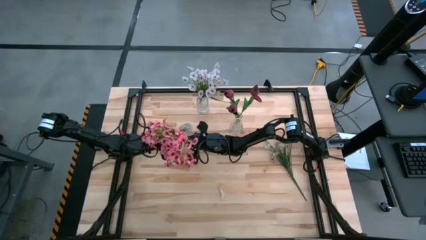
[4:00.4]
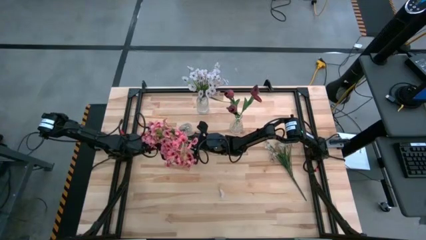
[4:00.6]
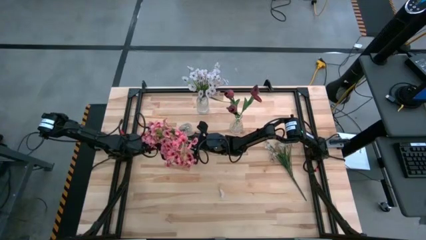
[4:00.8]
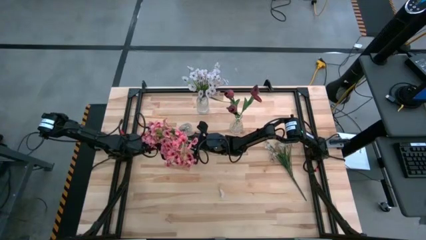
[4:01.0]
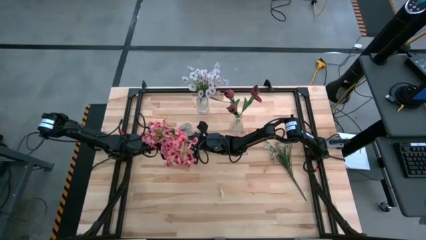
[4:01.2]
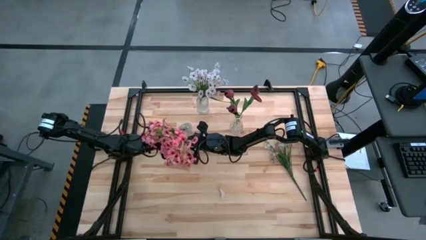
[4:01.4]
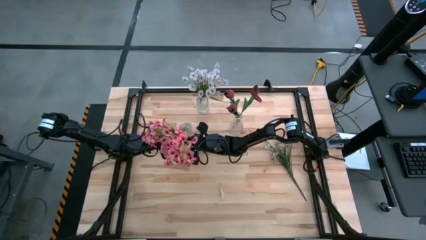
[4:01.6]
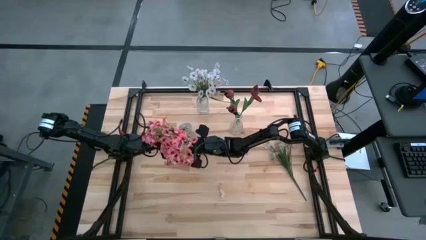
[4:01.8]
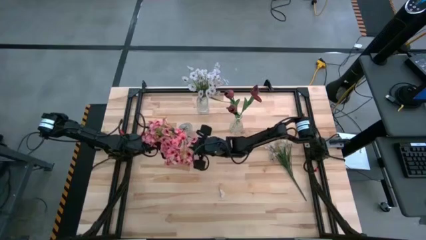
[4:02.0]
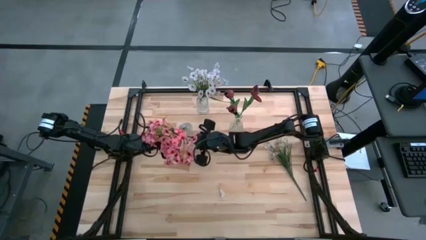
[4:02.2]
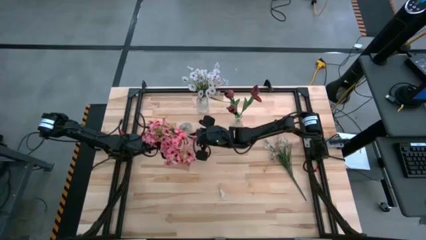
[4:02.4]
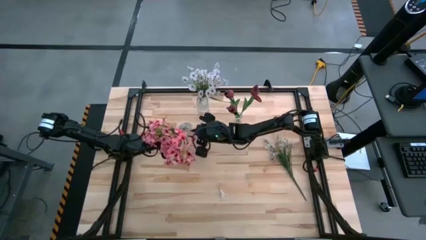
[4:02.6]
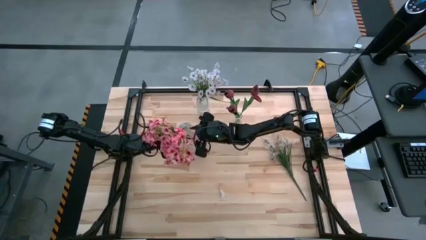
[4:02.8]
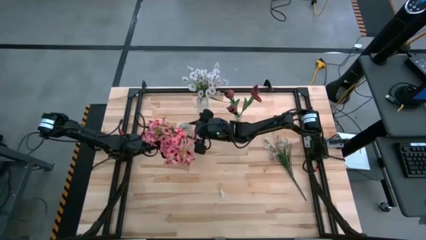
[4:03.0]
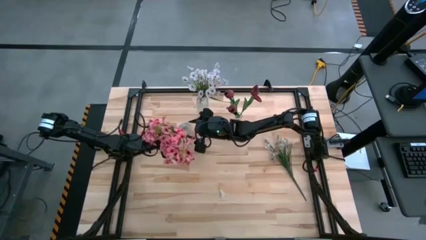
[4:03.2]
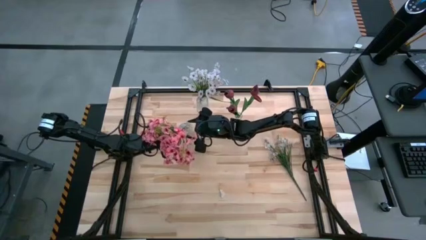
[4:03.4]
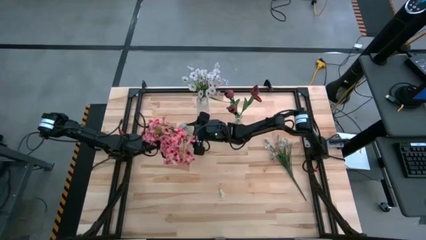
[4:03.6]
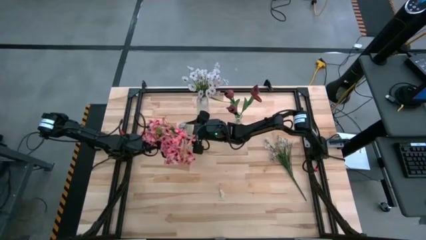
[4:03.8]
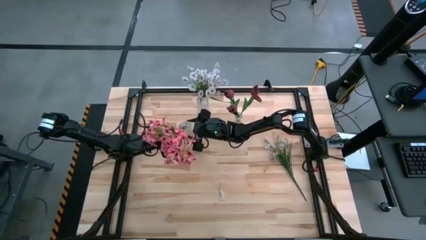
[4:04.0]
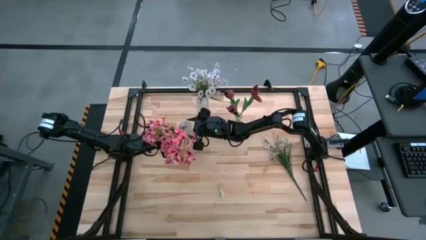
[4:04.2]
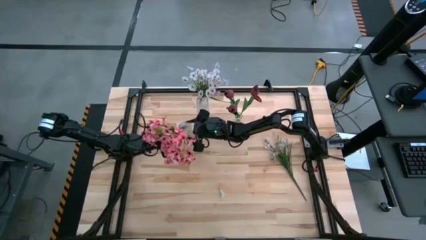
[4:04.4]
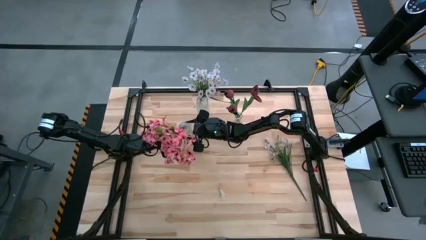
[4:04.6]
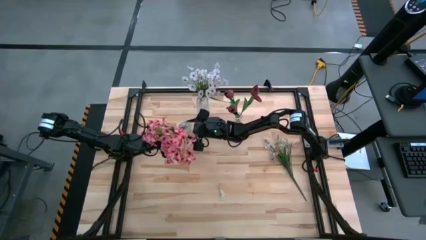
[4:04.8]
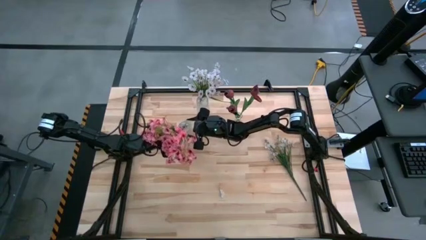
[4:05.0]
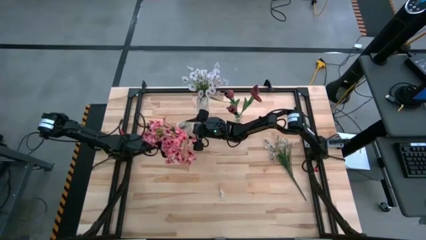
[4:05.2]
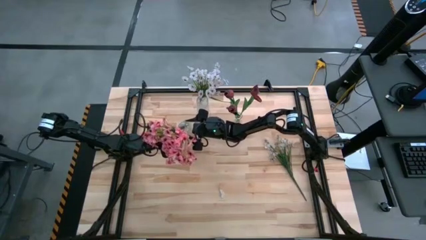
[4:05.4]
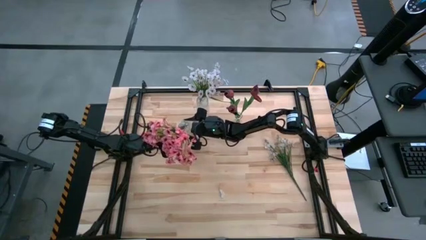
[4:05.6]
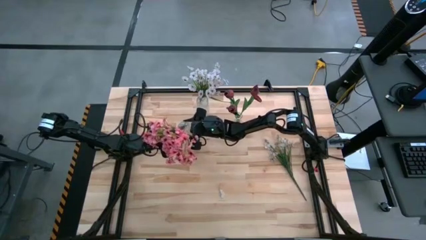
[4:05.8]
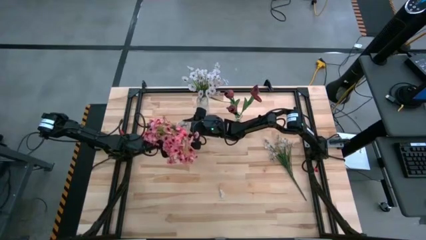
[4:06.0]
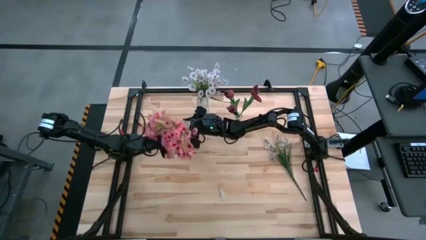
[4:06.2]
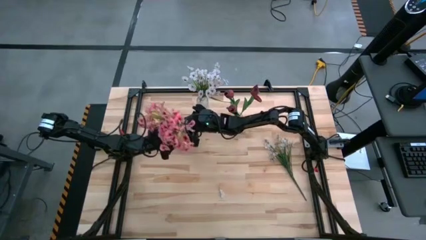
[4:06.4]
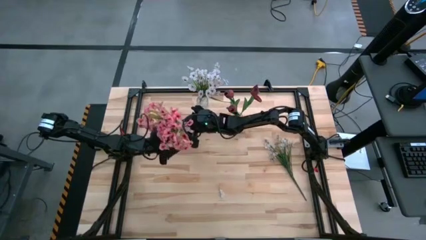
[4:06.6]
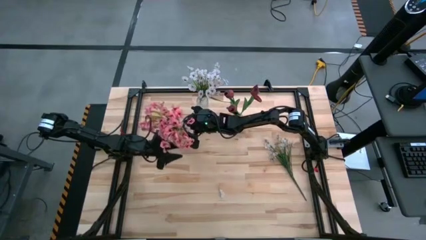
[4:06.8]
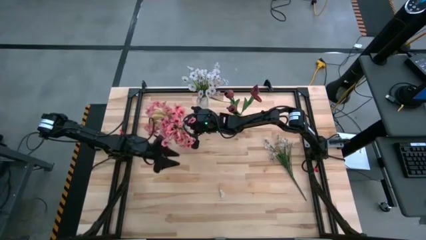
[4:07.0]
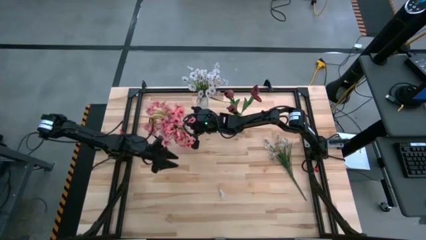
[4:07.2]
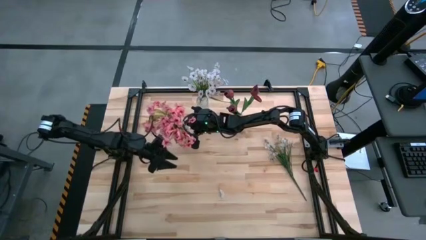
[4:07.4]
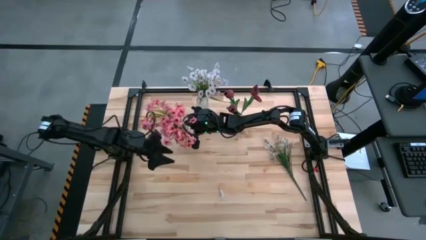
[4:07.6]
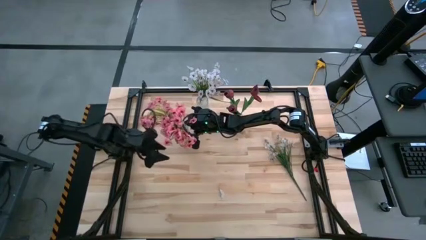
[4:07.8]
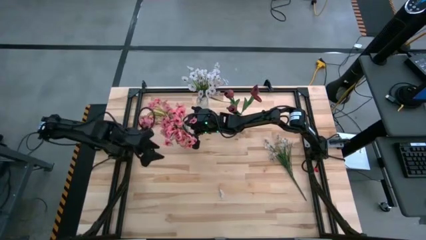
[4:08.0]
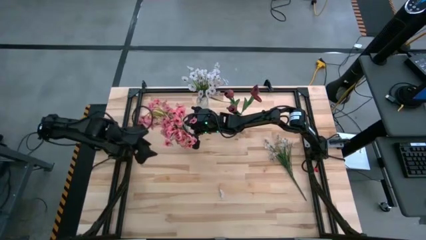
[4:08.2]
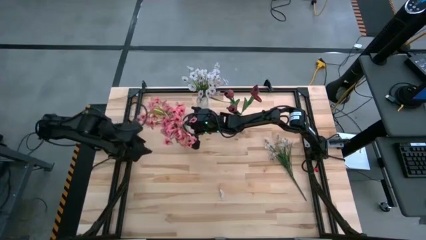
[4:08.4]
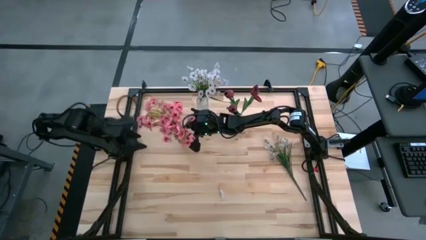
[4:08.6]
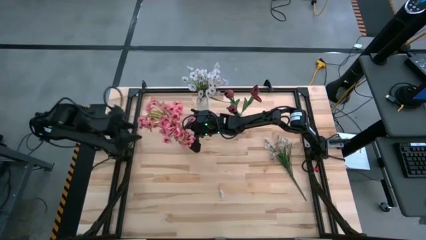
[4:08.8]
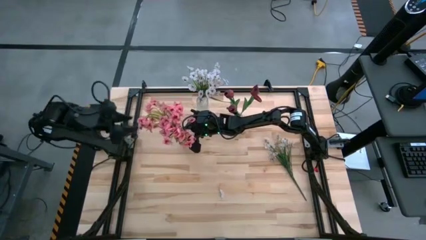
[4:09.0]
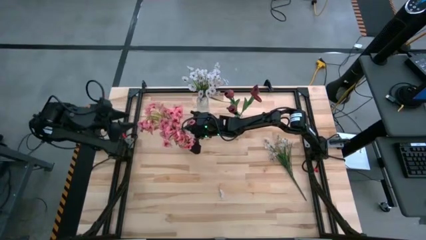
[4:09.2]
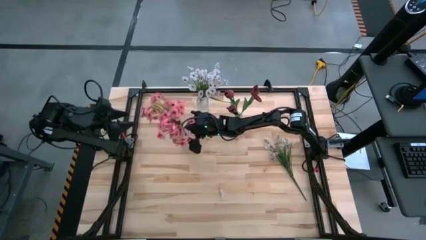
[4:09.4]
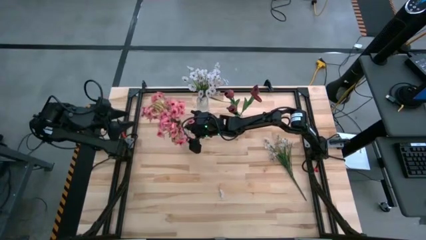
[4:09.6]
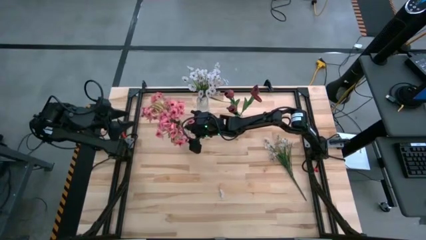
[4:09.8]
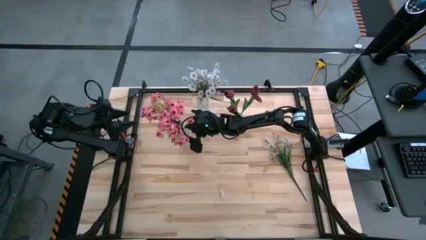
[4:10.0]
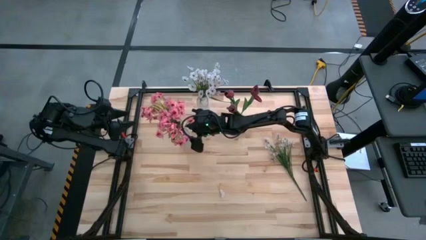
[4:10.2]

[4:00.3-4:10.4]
Task: Sort flowers into vase by color
Adjust the bottom left transparent vase

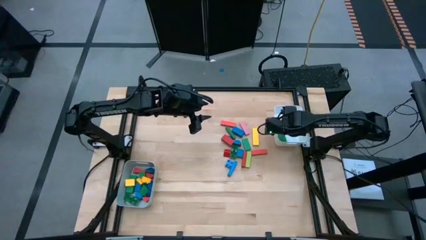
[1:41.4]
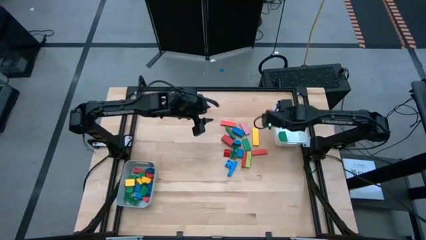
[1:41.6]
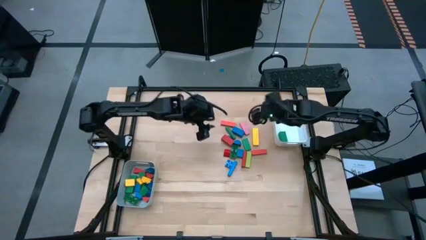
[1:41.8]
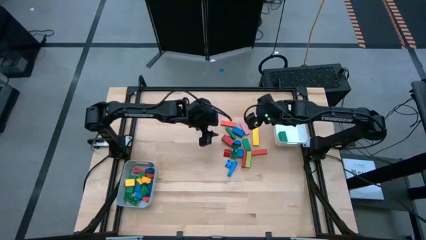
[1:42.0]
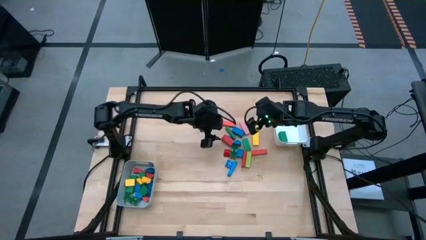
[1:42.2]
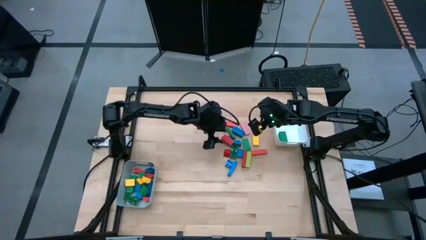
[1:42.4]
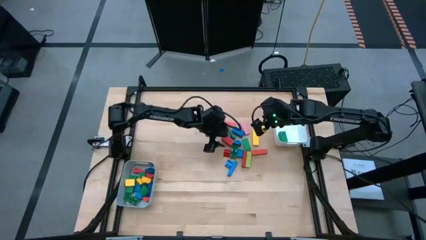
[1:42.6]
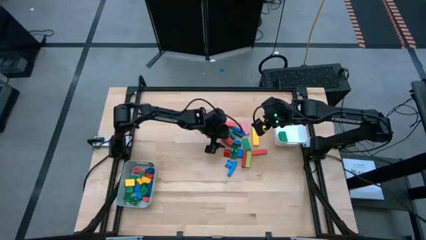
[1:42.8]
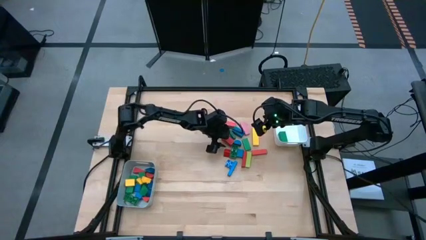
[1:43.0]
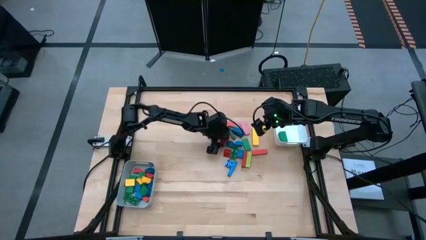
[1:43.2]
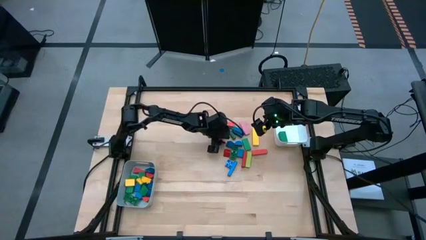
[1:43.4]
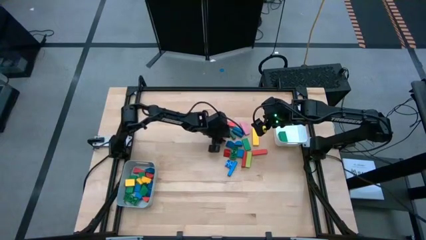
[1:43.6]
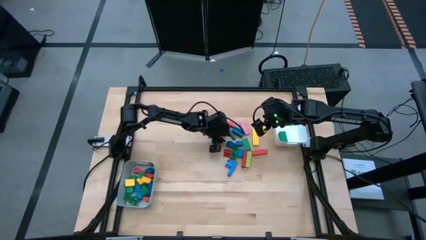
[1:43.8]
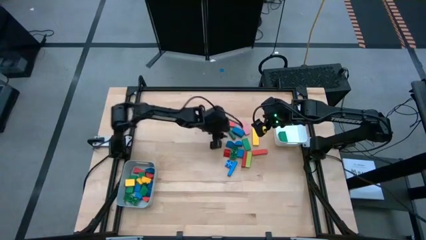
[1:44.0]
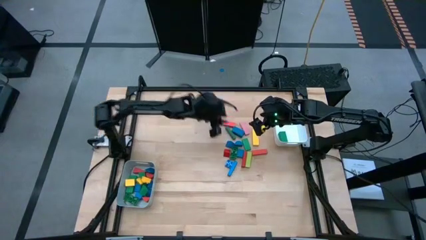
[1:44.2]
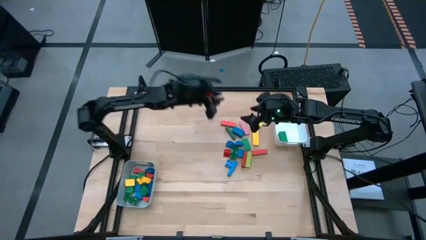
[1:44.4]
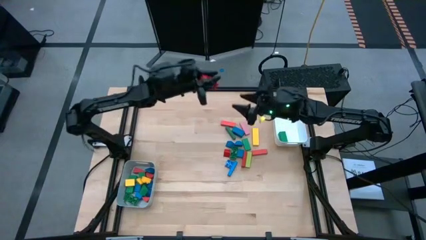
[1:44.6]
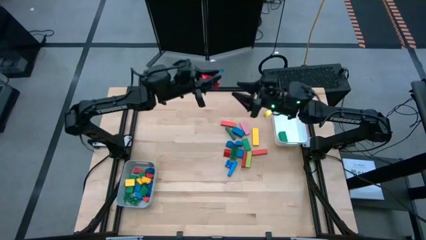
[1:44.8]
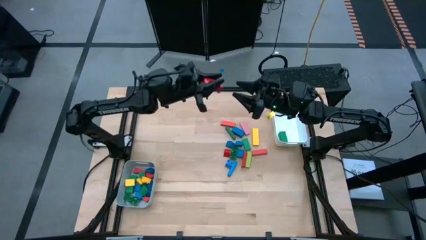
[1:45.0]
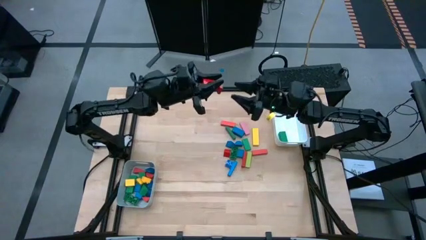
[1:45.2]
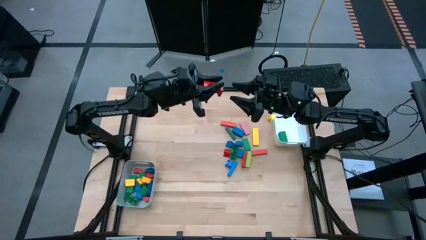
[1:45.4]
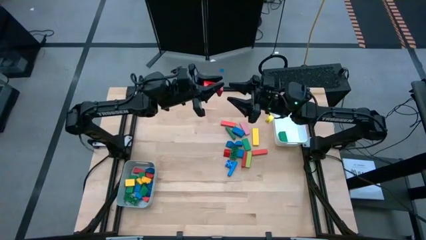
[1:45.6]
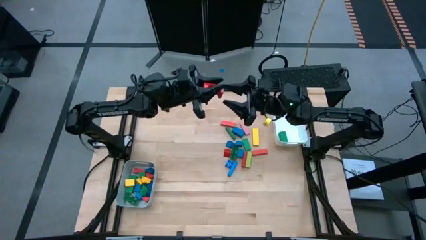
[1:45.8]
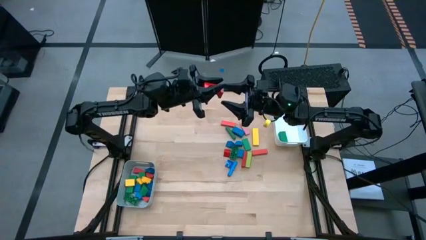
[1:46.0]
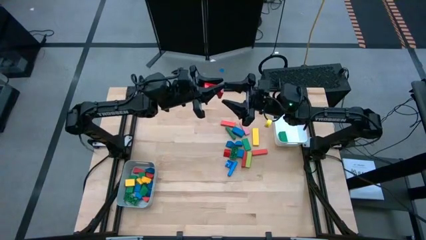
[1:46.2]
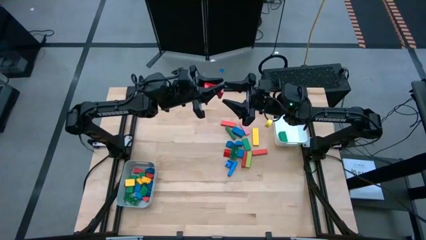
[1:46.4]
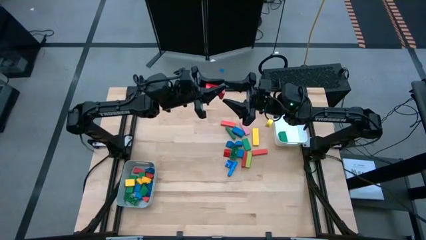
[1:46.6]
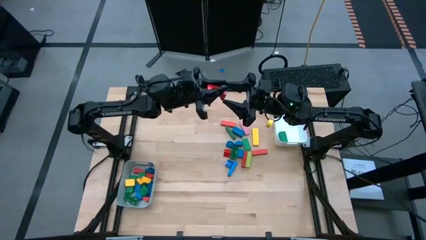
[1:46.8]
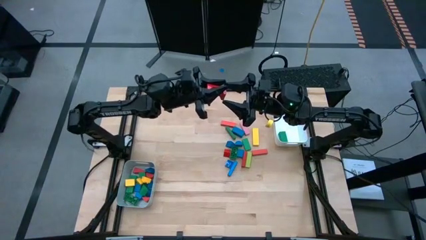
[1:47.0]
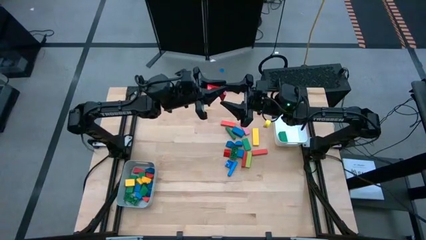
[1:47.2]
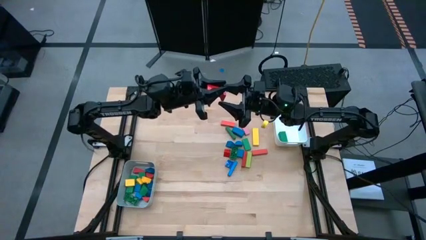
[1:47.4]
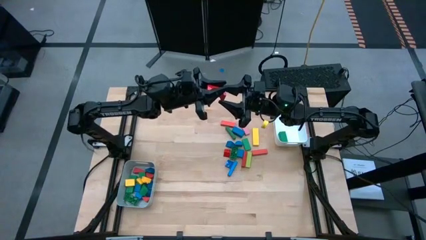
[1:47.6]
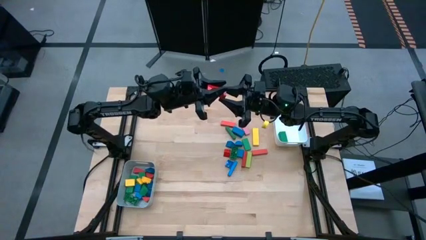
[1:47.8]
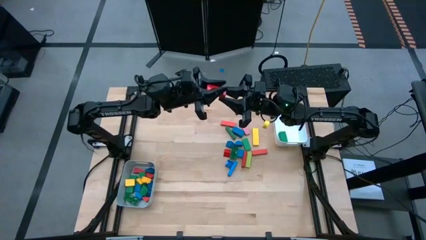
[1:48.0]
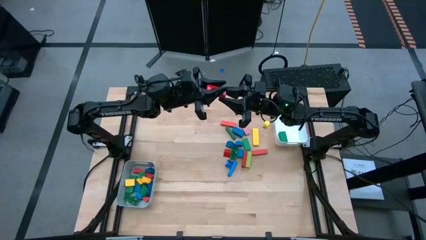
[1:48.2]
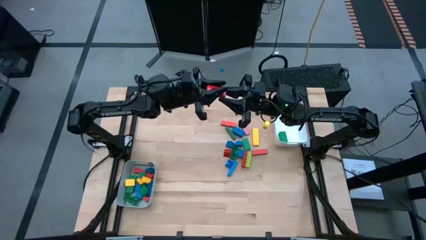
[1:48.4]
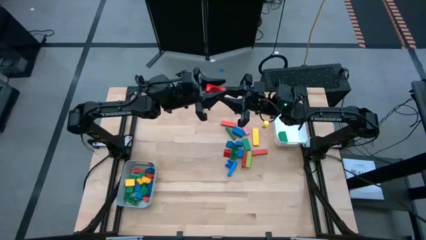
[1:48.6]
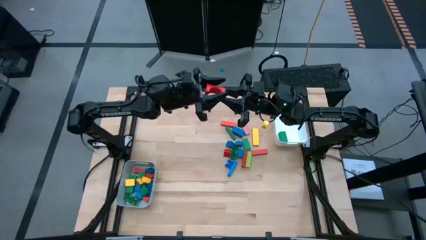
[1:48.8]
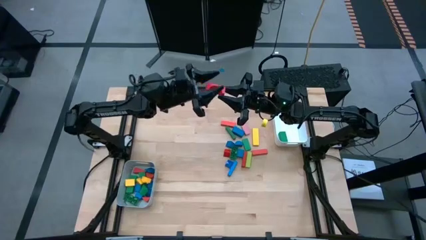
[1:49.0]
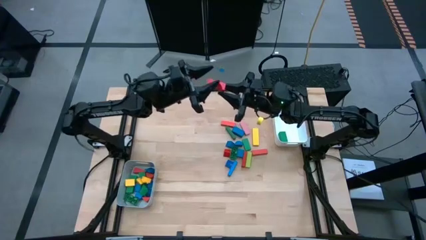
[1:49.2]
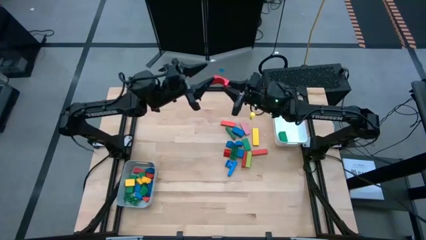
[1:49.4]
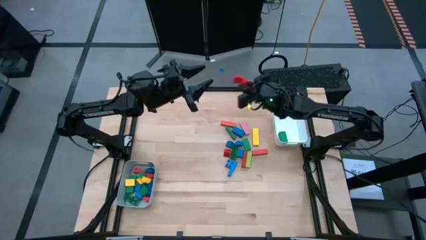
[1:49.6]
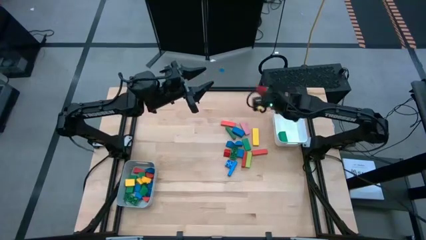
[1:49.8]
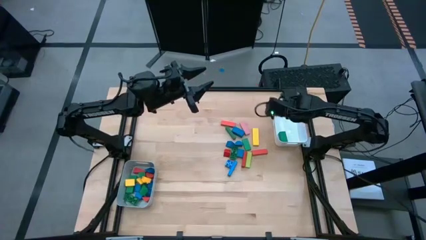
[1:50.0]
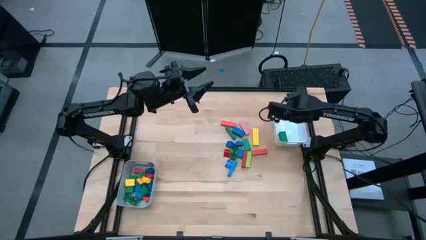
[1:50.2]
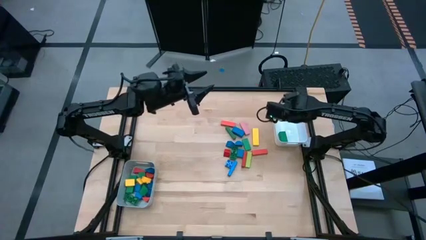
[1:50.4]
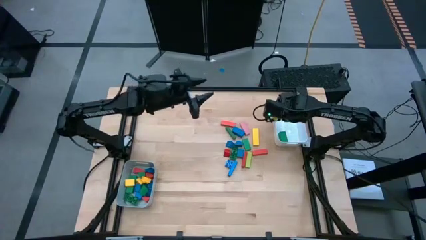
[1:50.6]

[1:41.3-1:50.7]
Task: Sort blocks by size
Put the orange arch block into the white bin
